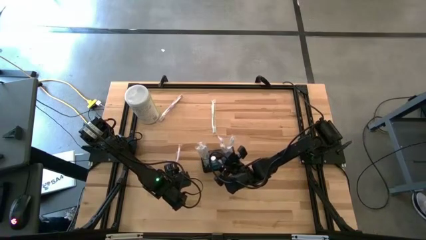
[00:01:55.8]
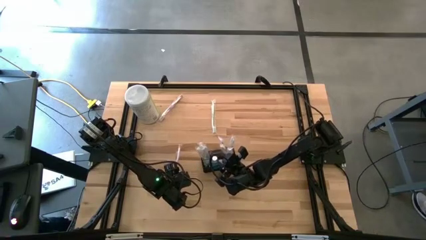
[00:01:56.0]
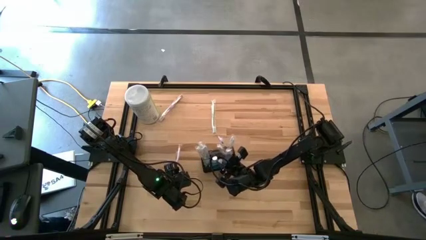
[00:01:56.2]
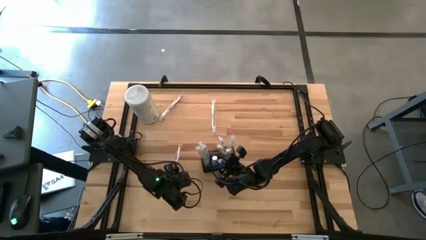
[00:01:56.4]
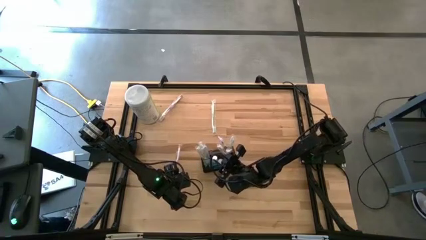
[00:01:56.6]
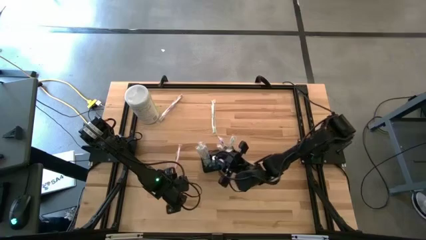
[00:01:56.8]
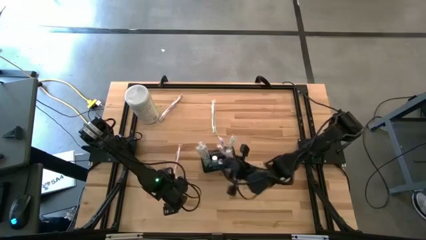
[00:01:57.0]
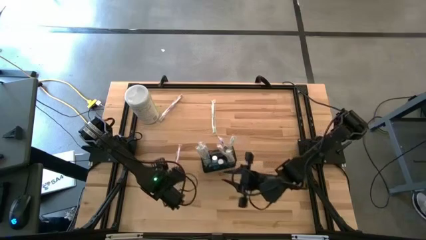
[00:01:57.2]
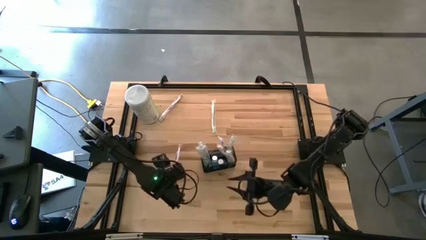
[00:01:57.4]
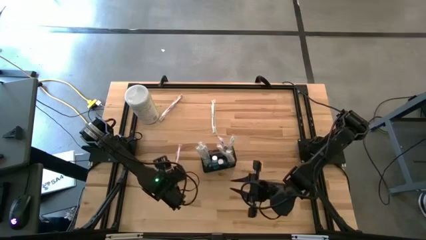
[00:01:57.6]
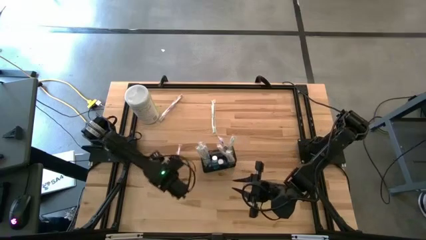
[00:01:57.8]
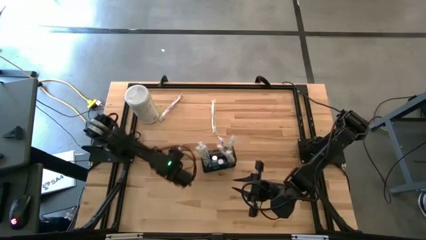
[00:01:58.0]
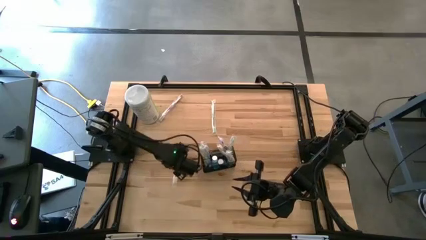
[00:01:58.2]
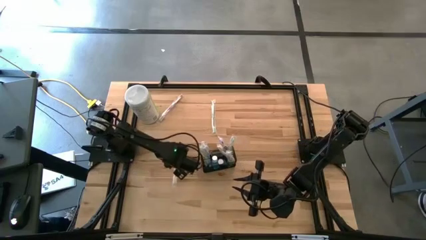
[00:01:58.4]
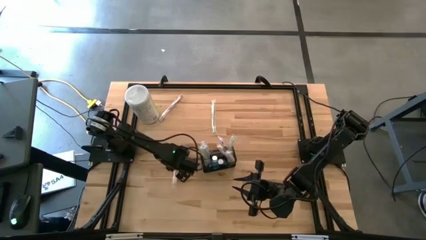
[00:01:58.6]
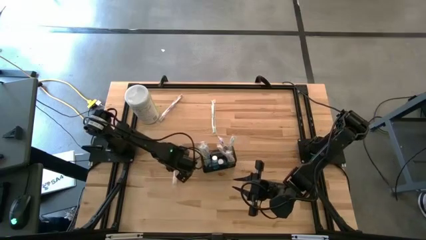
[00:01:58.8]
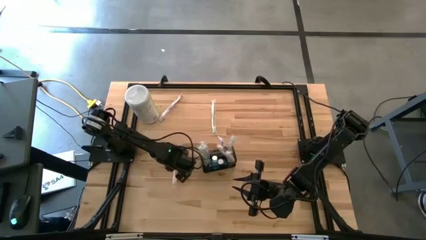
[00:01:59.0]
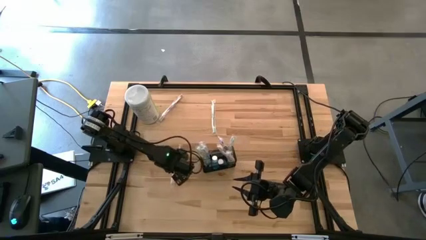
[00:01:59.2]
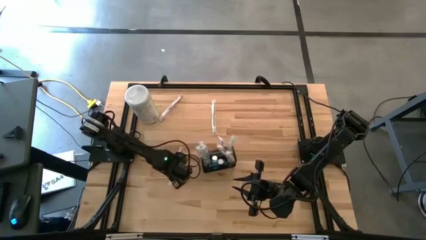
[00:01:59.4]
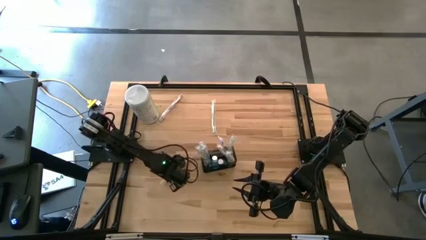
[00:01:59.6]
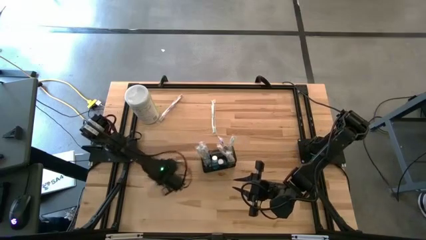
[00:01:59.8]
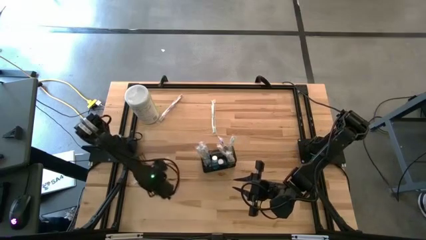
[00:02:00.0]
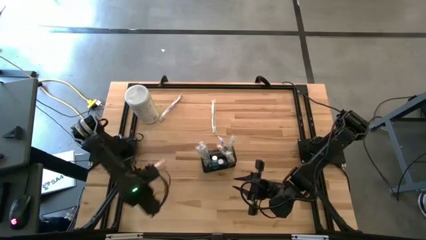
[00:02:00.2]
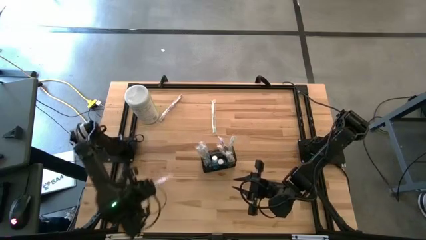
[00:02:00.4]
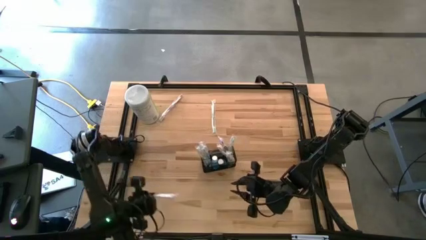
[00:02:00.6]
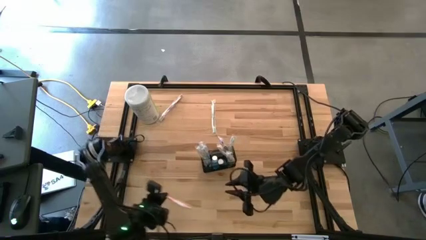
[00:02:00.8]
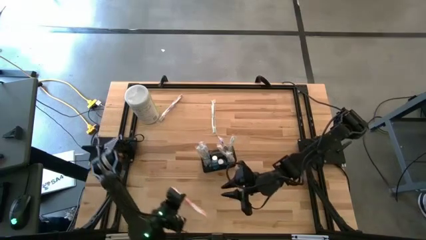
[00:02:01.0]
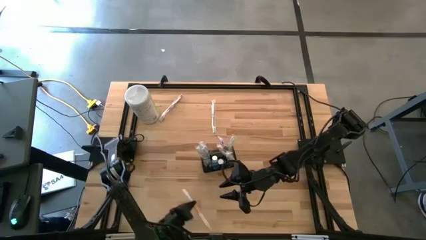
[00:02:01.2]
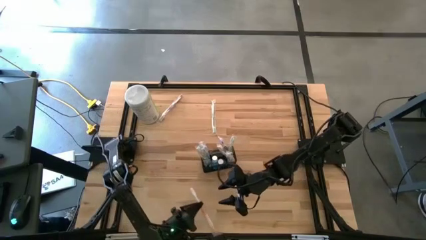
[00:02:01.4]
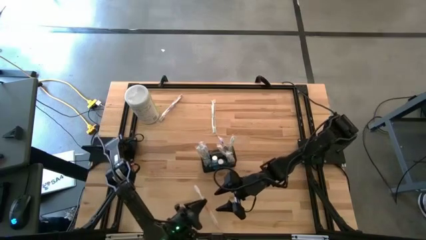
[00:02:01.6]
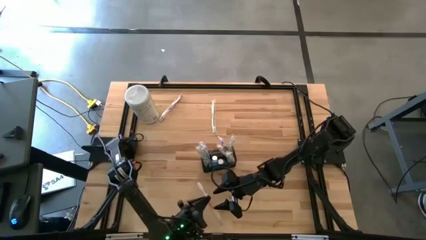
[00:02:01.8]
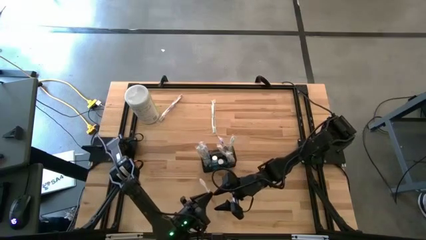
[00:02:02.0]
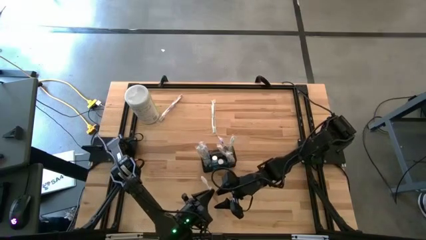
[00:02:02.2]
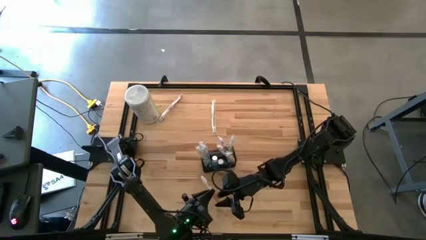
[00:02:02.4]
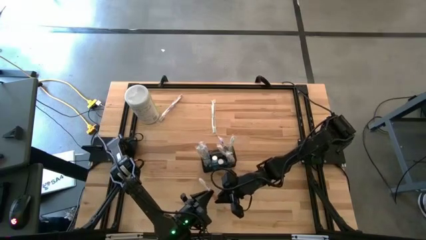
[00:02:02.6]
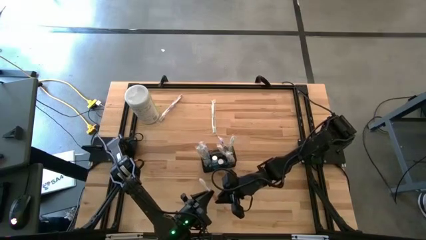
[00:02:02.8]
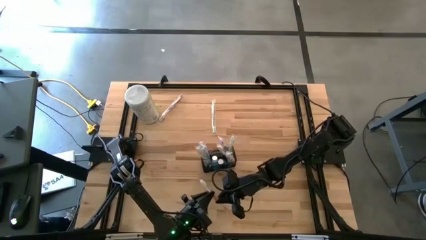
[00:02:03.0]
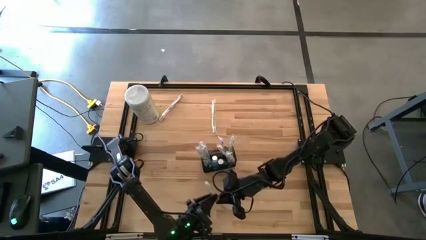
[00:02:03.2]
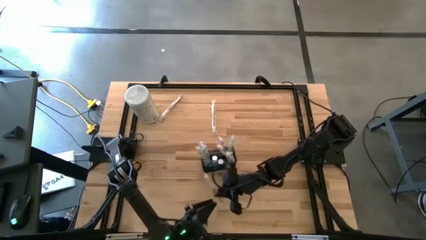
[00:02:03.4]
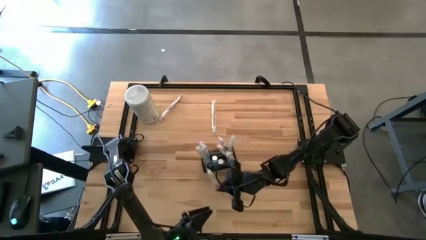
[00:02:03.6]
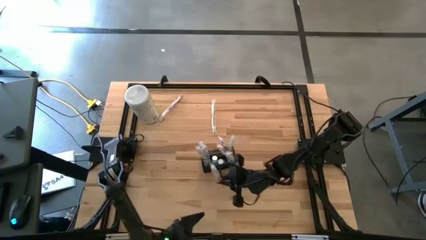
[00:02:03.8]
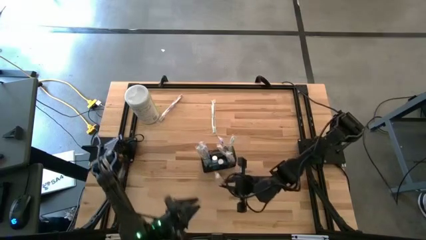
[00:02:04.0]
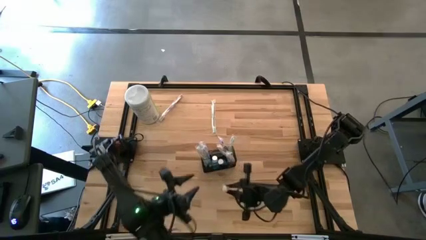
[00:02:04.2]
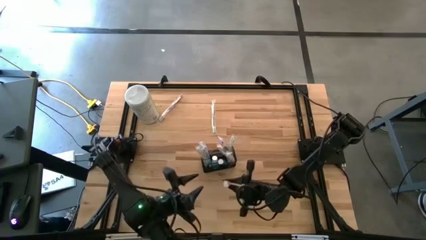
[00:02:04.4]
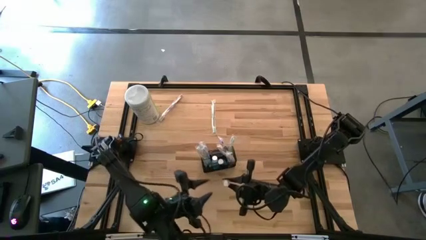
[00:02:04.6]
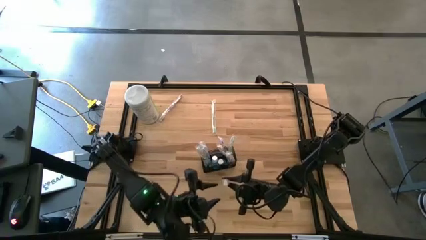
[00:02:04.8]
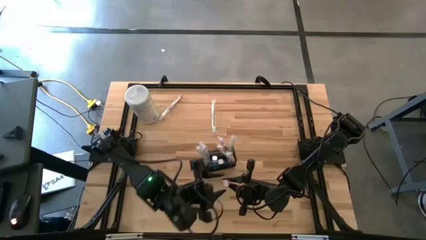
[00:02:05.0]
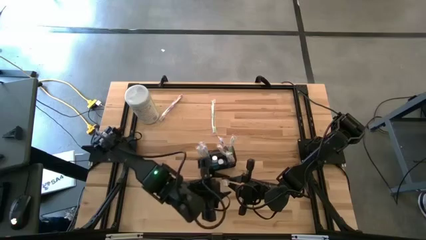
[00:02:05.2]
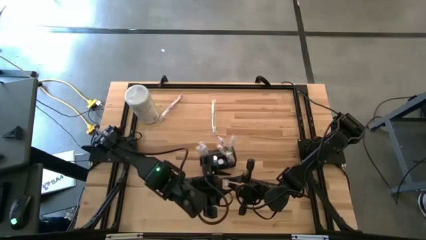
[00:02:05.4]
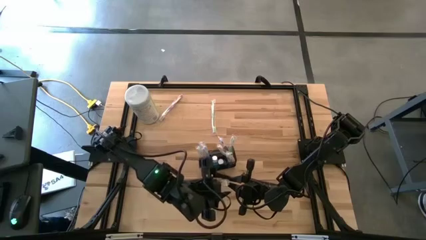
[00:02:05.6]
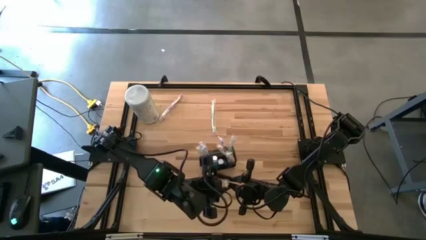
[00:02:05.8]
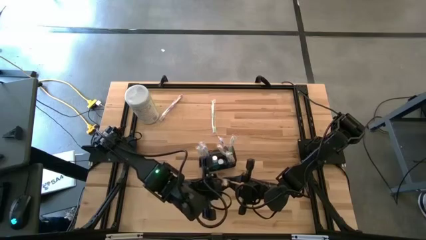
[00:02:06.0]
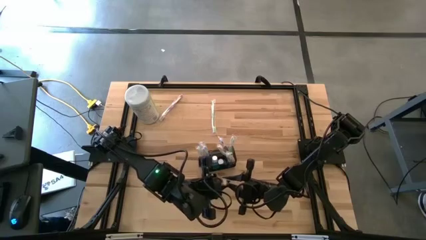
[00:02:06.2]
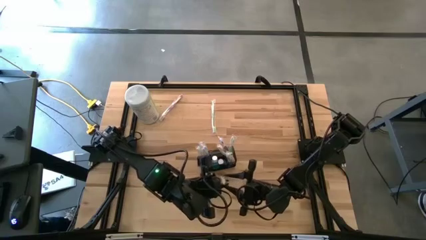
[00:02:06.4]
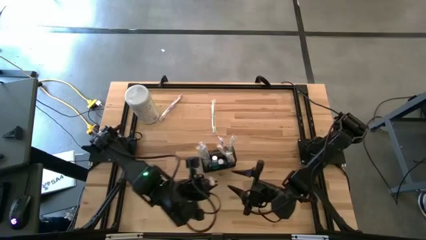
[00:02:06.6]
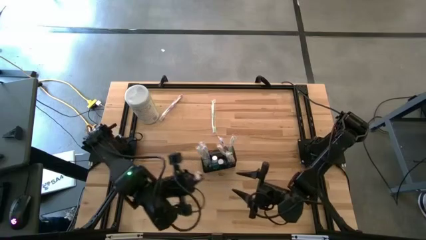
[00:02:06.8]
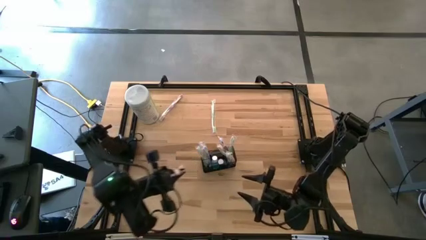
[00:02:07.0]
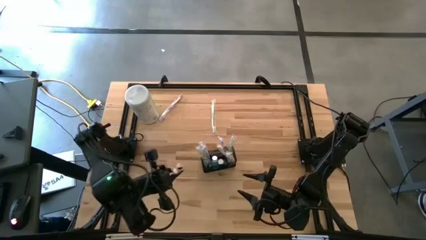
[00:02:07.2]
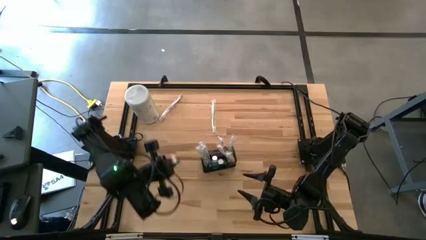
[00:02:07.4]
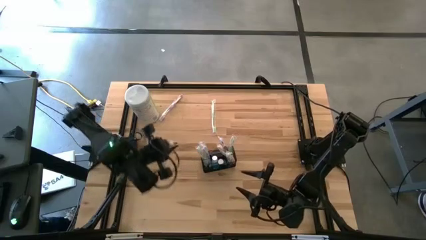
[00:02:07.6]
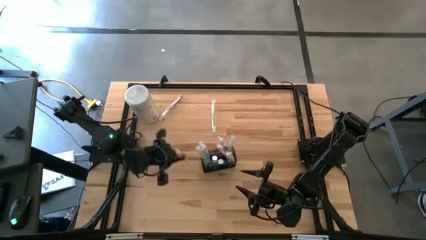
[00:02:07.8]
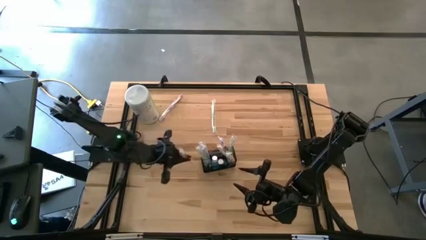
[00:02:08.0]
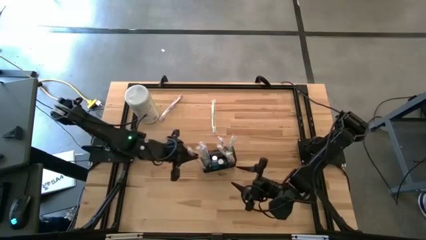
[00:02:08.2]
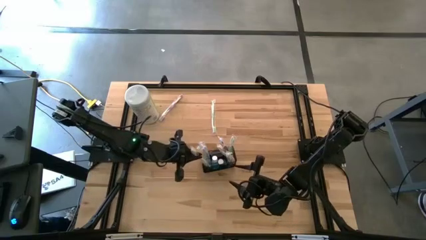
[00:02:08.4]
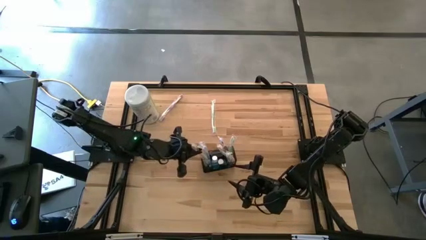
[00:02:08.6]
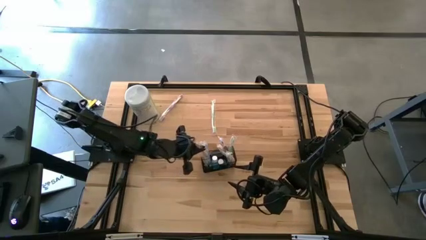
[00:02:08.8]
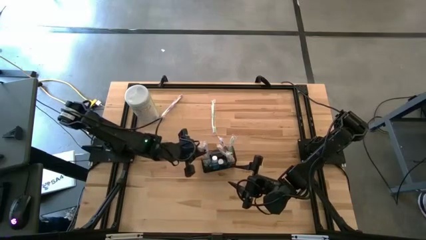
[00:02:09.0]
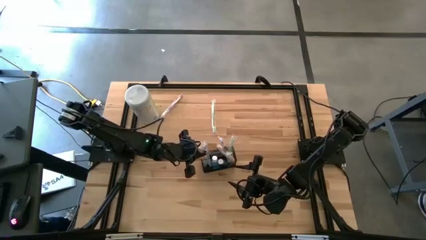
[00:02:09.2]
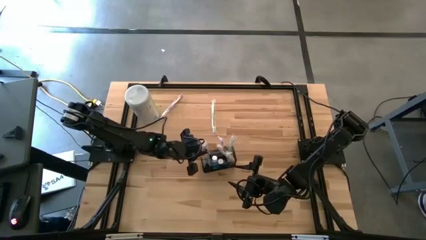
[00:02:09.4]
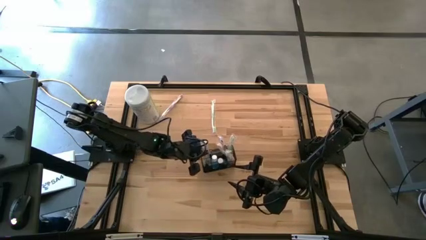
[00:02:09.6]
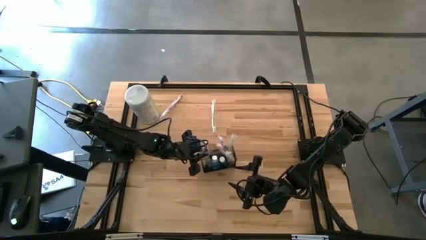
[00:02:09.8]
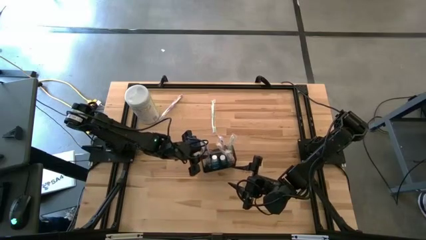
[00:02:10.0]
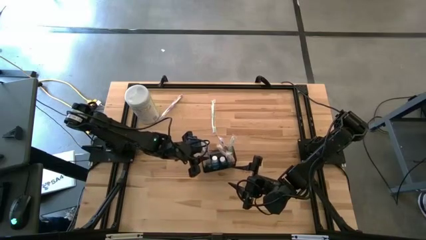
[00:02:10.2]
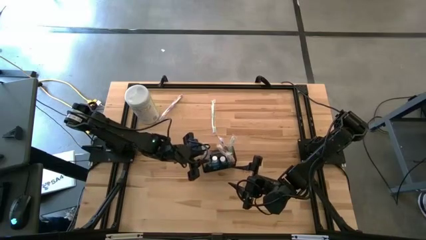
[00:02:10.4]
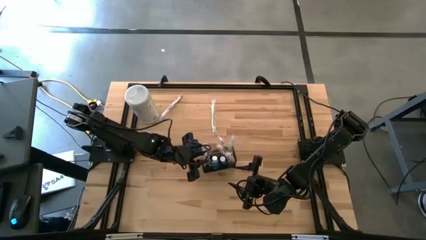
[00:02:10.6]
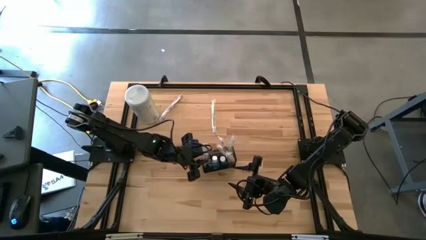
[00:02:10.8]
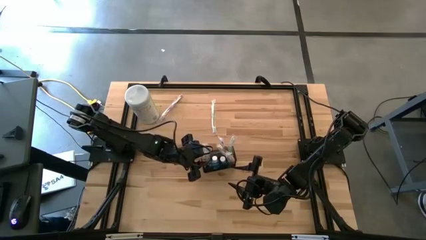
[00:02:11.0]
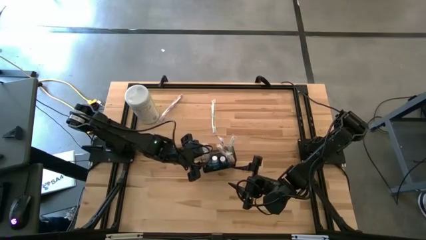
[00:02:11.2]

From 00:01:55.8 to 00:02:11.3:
Task: Pick & Place toothbrushing station
Put the orange toothbrush into the black wire organizer
